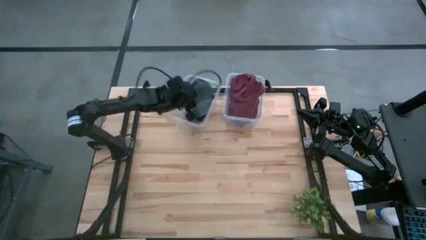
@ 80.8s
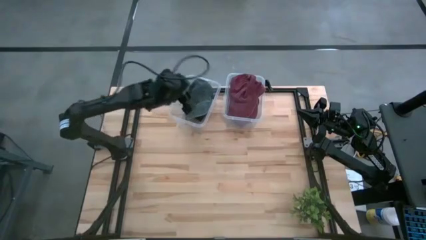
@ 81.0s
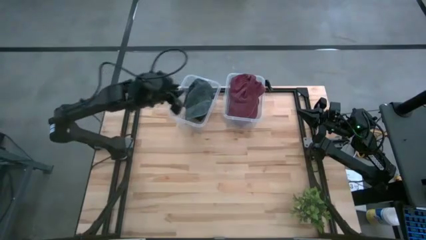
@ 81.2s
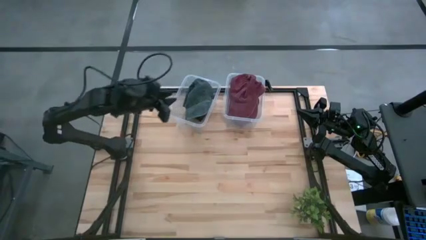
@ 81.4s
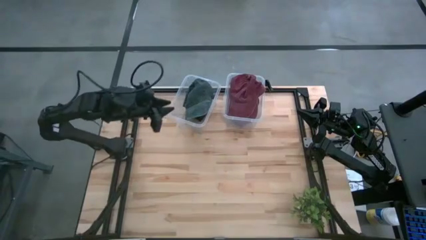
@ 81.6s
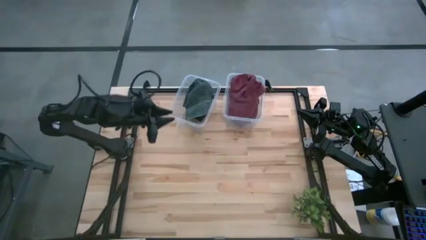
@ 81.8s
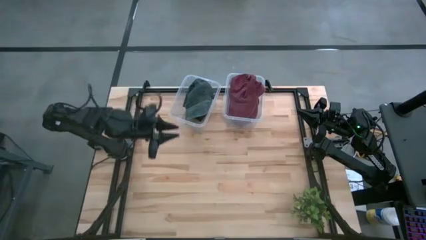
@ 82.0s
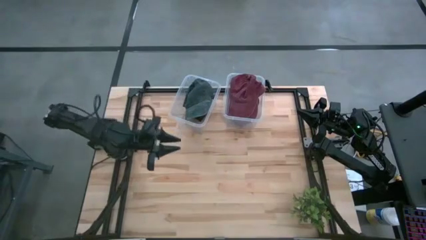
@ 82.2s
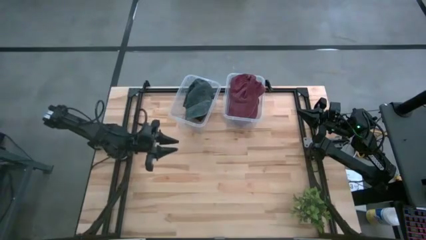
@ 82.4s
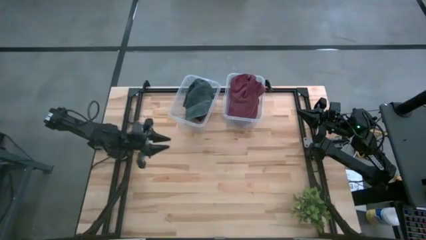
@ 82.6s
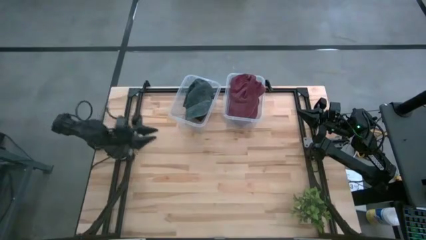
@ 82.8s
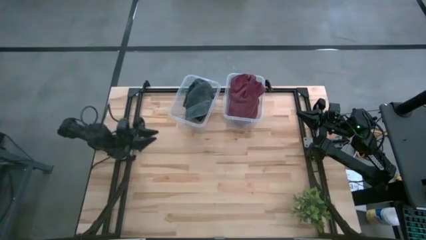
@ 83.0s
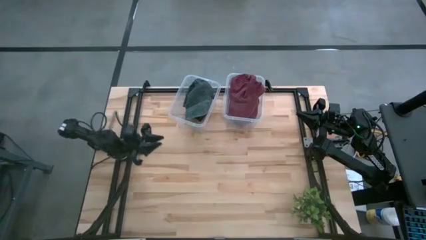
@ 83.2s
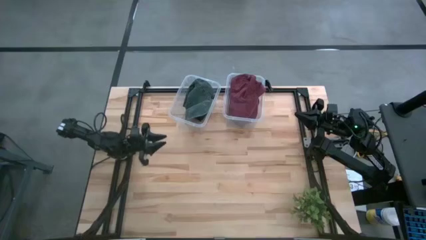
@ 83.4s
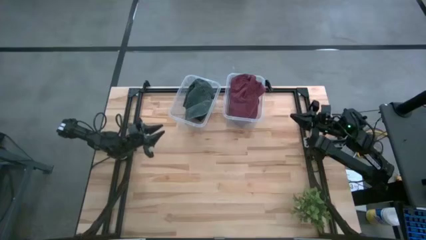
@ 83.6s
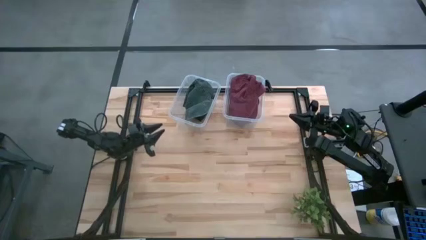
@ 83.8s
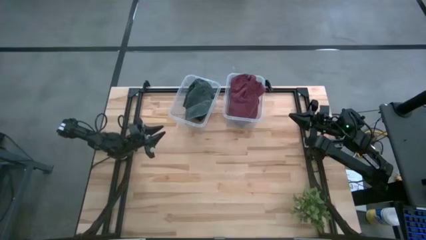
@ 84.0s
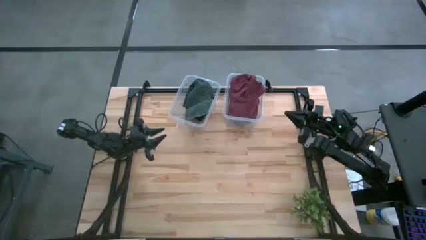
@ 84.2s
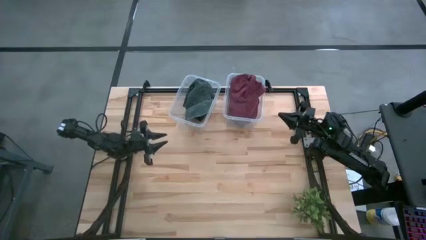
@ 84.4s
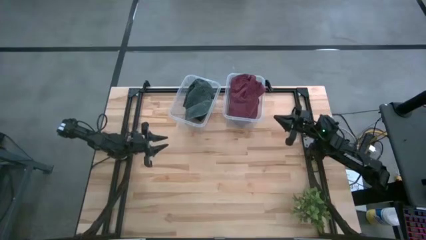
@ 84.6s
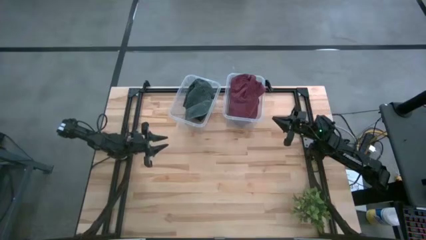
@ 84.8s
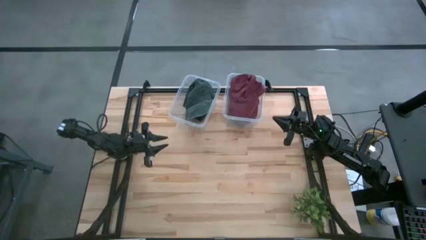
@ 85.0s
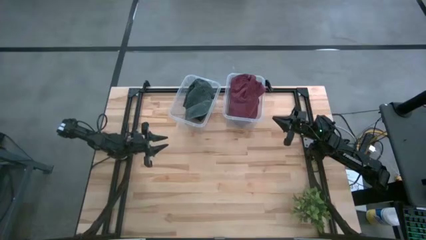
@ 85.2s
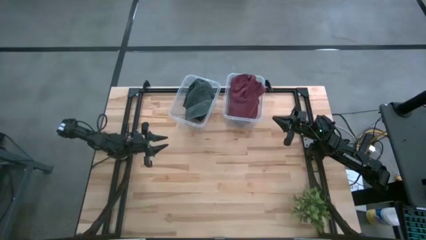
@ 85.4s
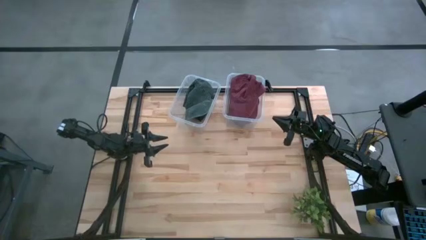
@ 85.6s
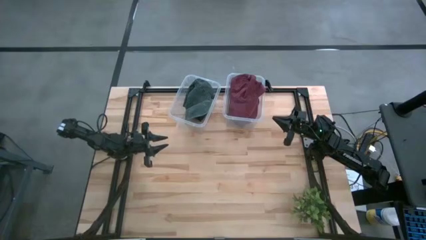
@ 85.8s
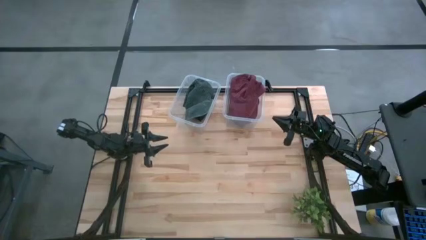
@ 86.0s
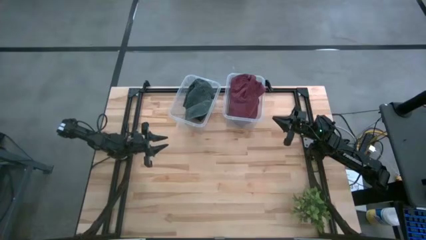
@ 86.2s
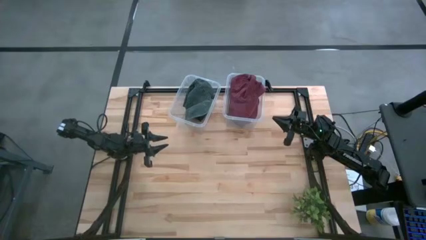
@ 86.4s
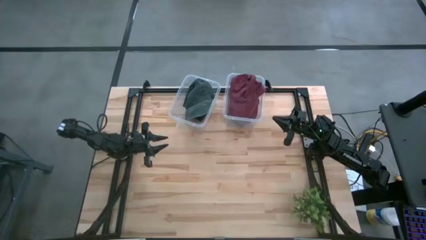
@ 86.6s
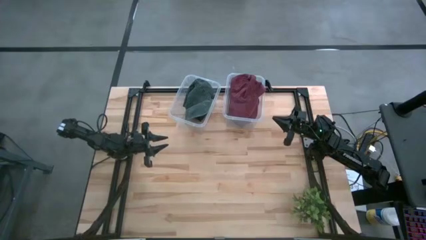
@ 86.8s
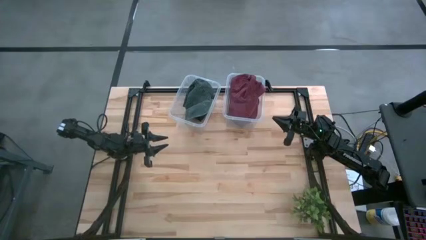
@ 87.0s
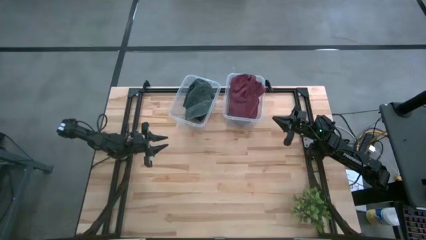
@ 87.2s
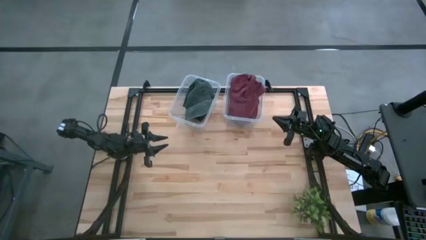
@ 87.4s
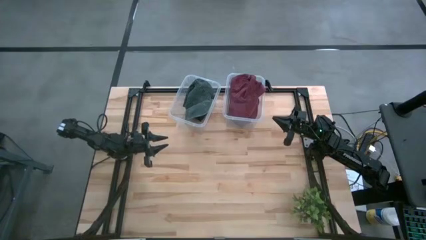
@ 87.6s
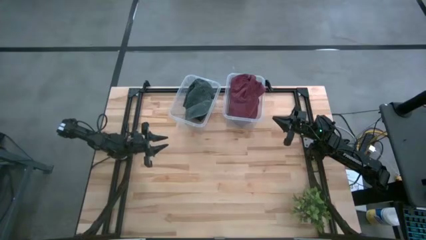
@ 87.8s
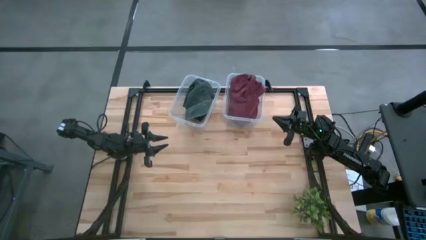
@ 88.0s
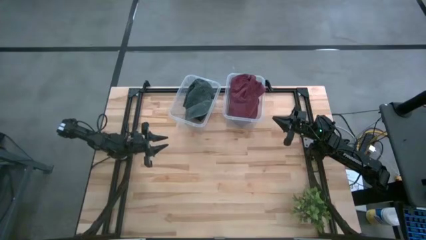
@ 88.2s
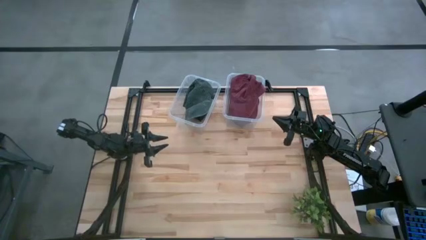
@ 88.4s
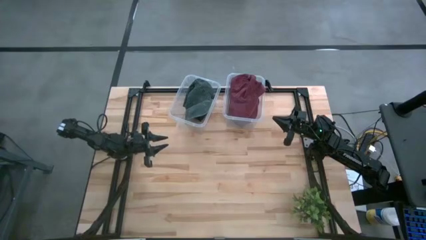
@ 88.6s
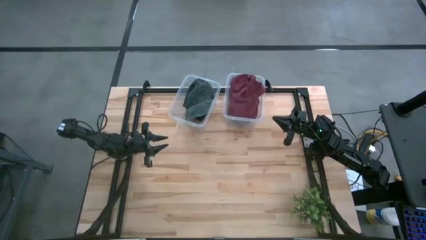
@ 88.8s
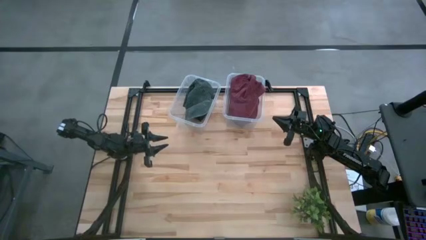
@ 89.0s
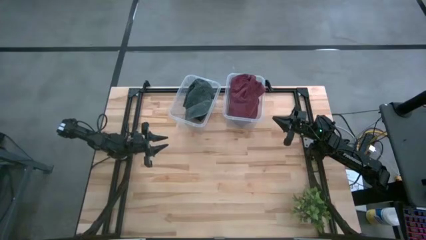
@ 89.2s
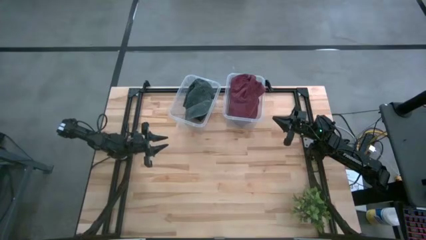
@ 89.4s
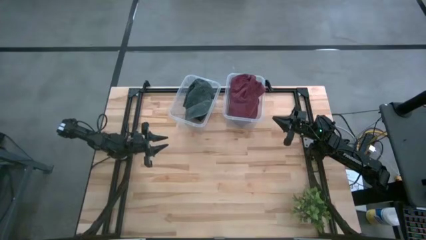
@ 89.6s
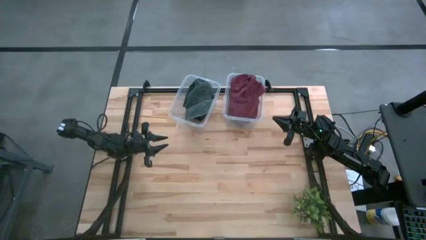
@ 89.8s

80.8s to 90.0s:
Task: Pick & Place hat
Return to home position

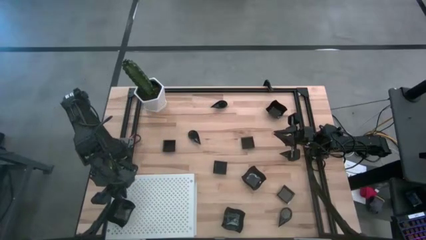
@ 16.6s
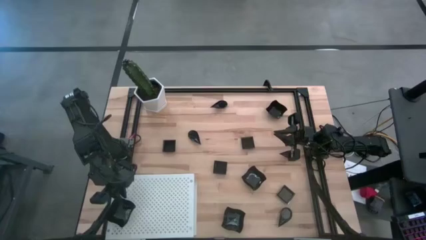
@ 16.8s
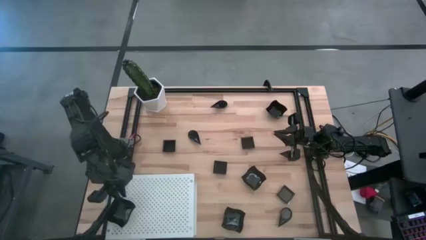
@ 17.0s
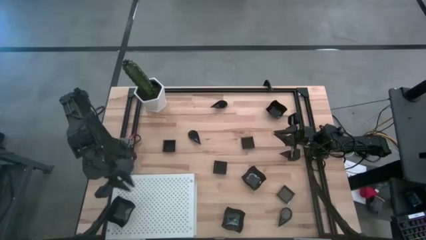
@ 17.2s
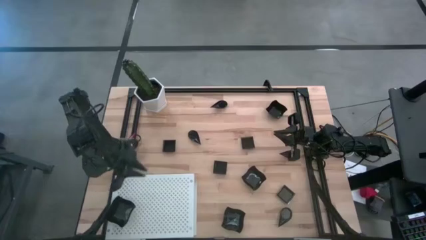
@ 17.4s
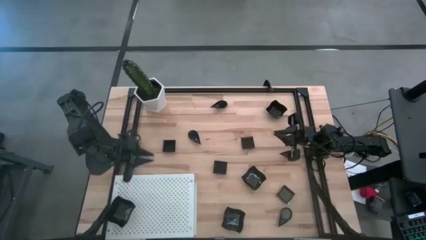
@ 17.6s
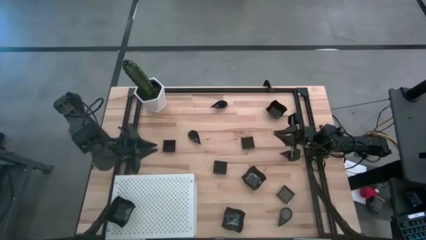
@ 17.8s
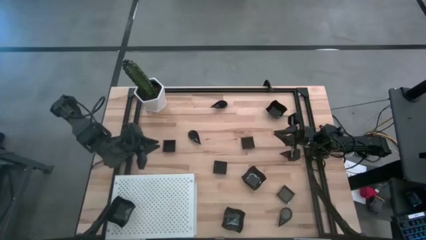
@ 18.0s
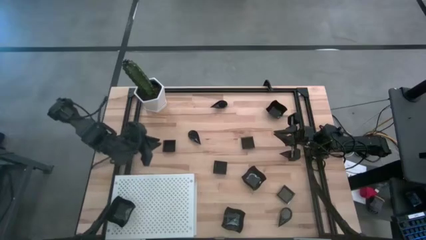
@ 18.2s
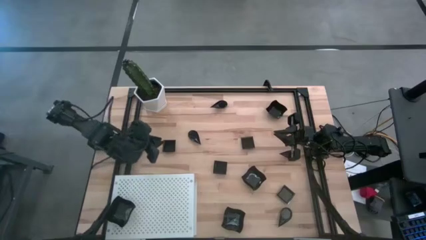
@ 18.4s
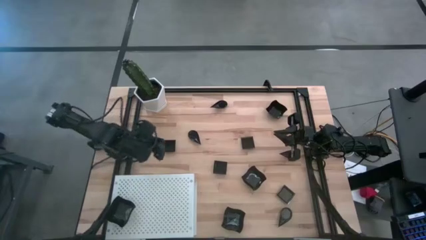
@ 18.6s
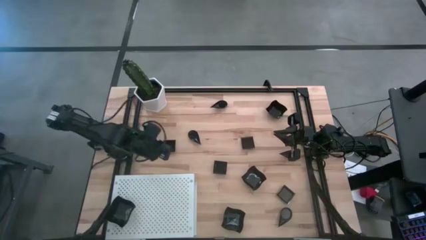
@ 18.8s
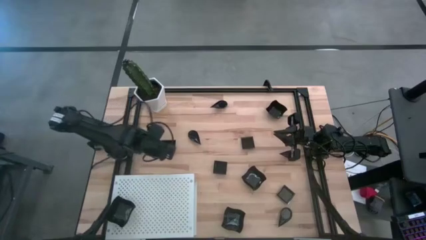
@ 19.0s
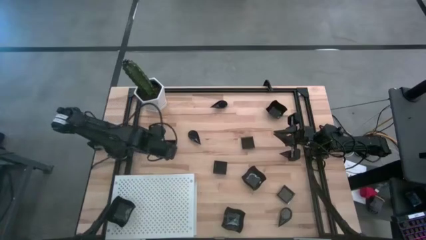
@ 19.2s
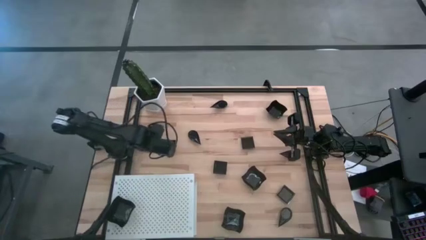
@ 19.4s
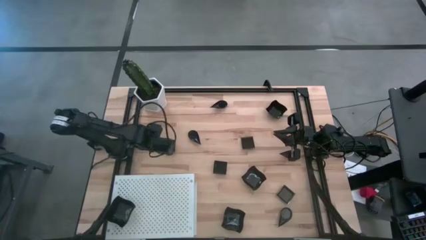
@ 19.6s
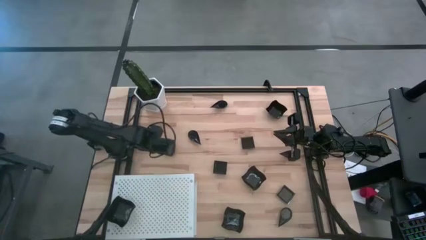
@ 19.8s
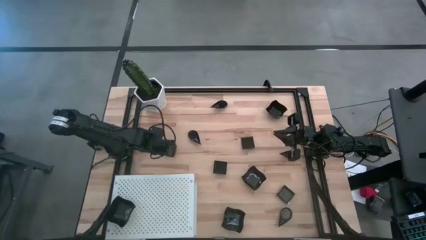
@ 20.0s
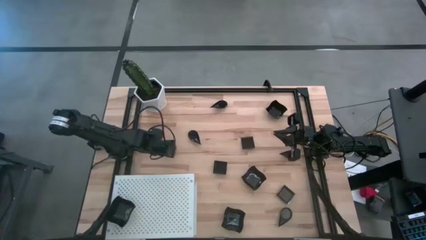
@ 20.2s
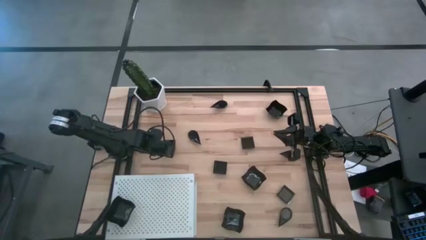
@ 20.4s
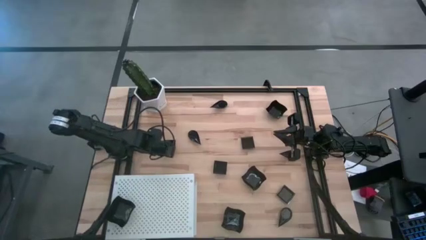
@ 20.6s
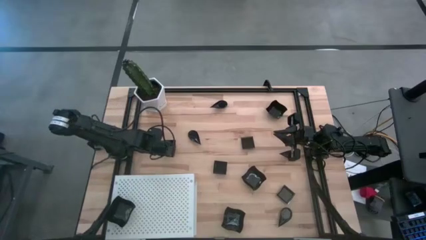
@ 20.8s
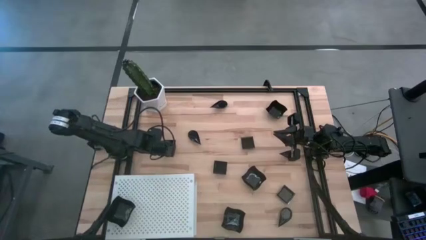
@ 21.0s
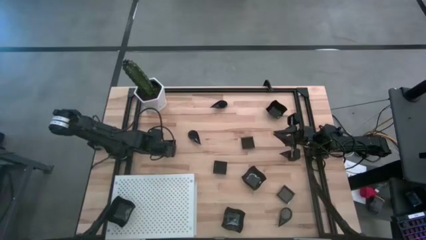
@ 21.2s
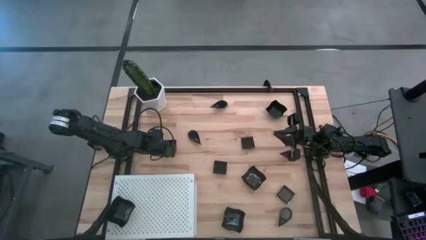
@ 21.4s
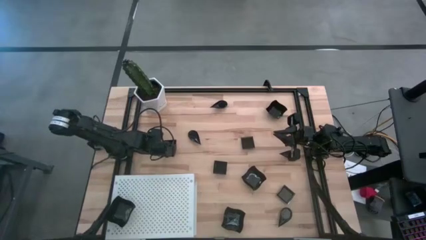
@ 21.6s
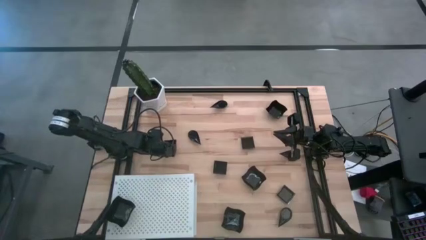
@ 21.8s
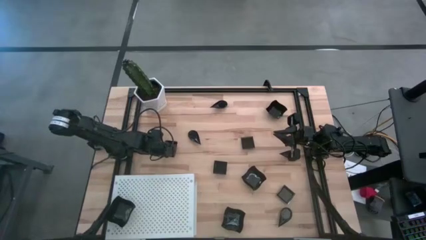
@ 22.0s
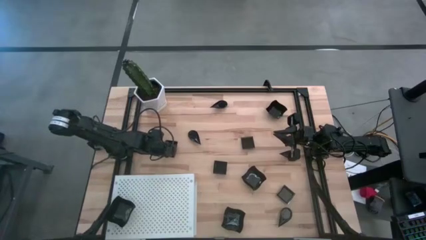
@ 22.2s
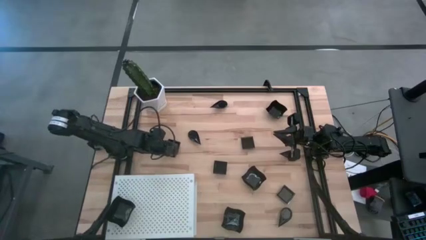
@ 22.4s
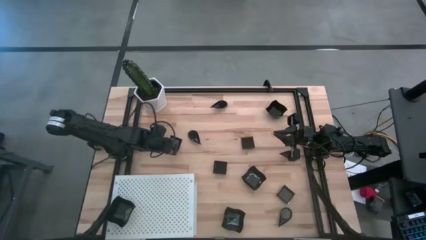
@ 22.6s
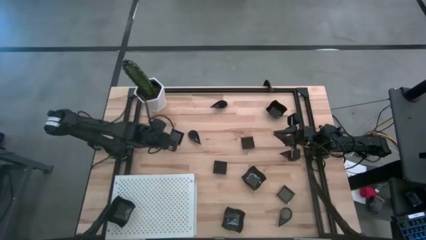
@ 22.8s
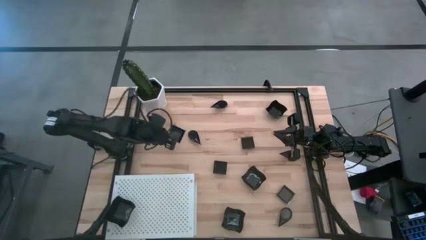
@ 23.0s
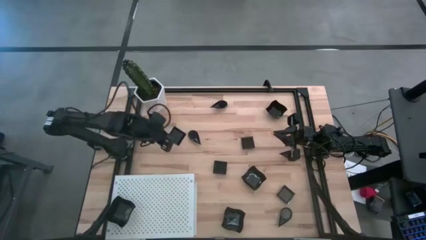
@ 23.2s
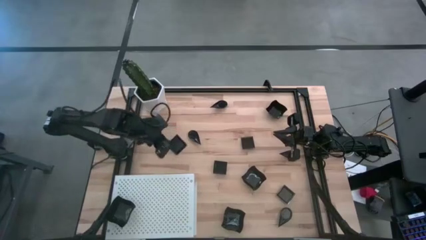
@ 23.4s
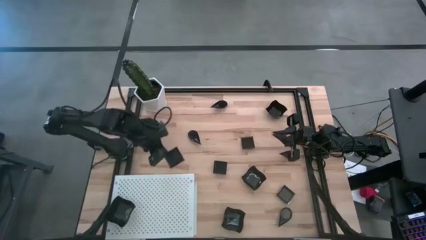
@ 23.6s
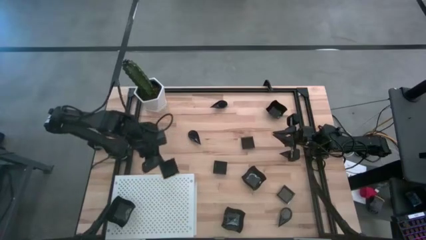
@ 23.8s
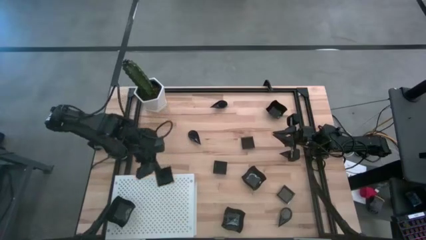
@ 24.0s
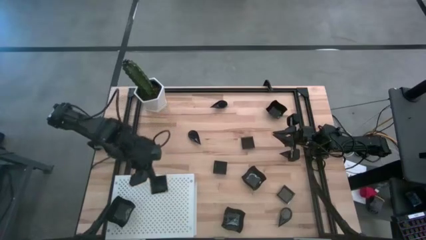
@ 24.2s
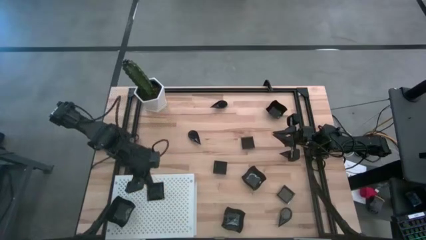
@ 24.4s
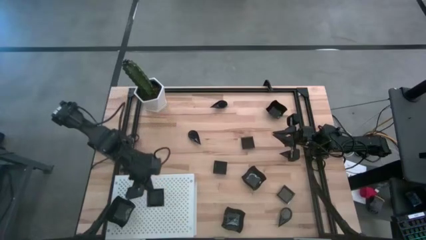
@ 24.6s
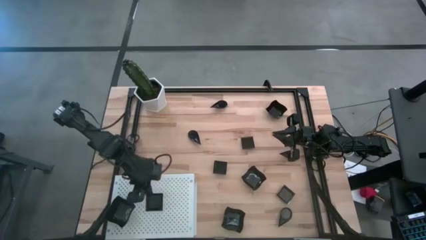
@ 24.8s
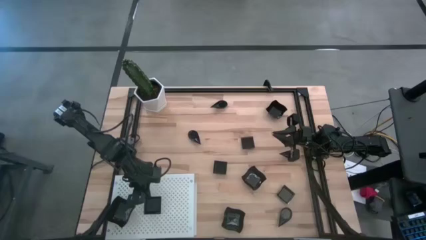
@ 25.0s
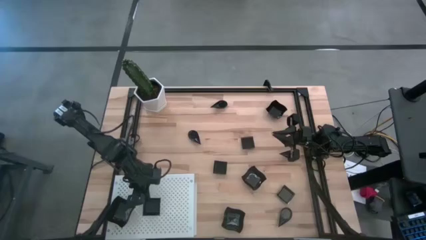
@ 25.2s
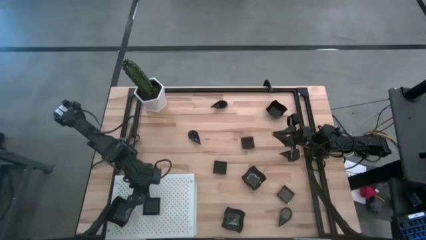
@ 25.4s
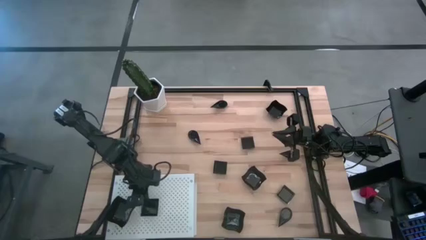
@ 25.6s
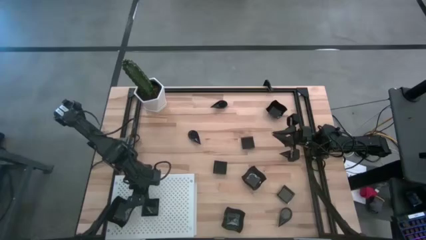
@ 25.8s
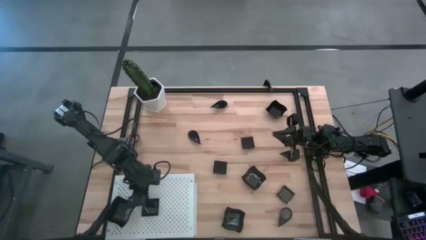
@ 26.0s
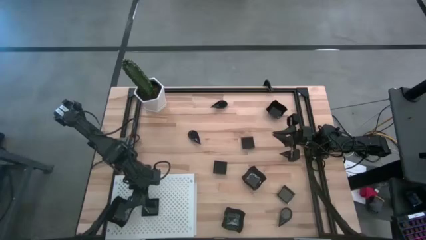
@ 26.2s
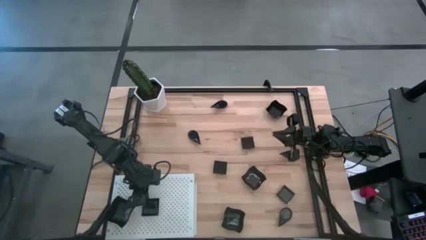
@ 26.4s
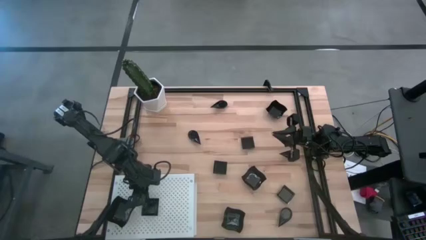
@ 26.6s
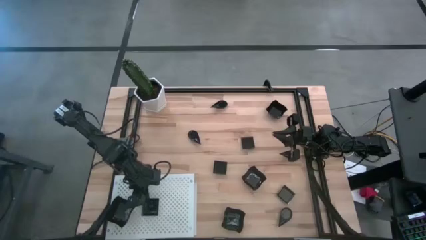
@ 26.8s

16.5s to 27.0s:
Task: Pick & Place Mini shaped plates
Put the square plate on the shelf
